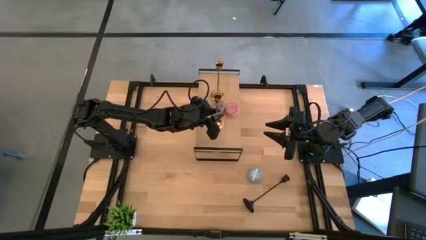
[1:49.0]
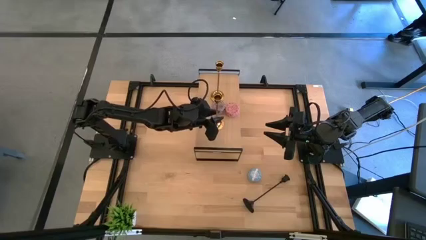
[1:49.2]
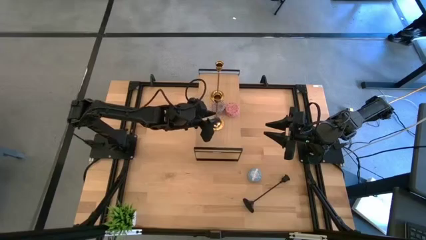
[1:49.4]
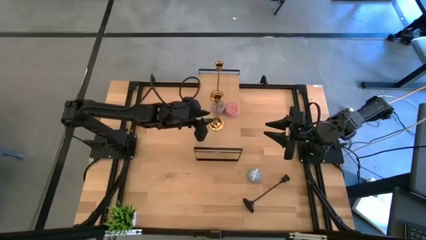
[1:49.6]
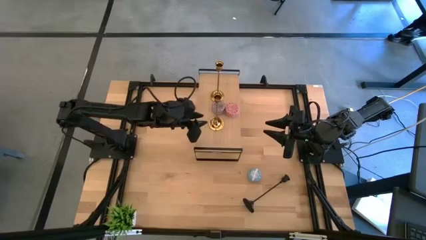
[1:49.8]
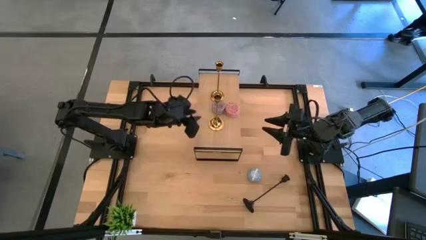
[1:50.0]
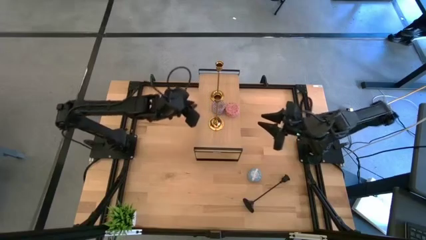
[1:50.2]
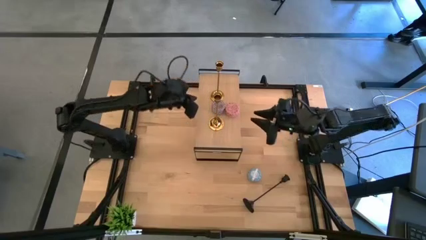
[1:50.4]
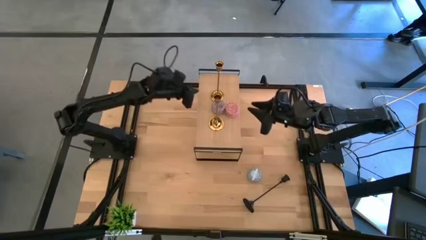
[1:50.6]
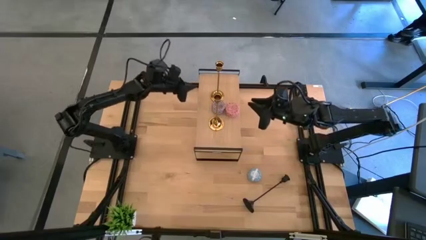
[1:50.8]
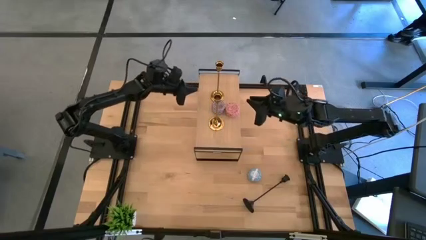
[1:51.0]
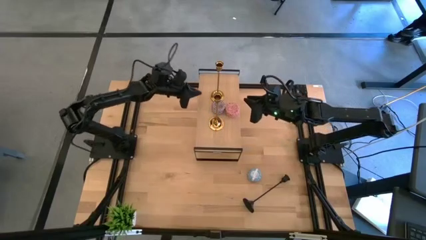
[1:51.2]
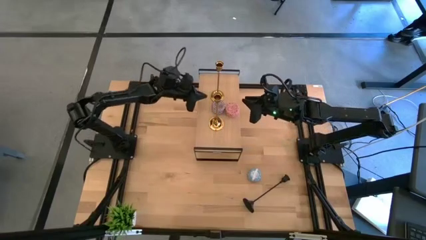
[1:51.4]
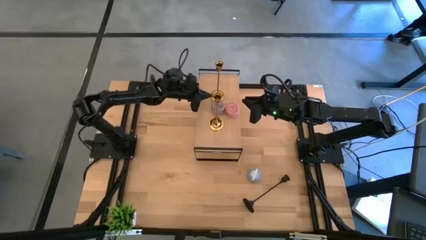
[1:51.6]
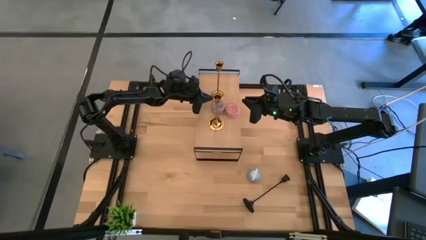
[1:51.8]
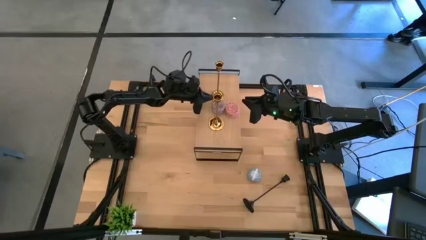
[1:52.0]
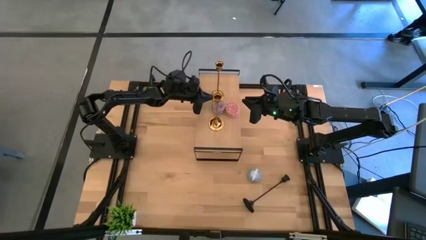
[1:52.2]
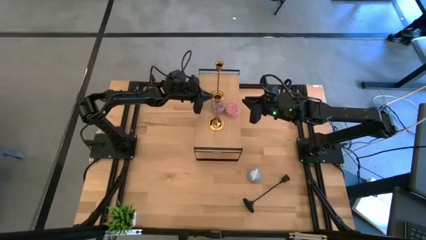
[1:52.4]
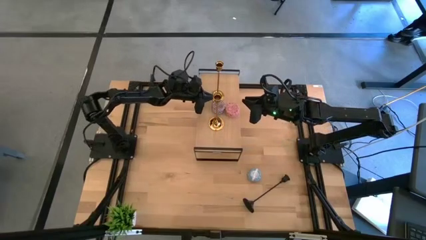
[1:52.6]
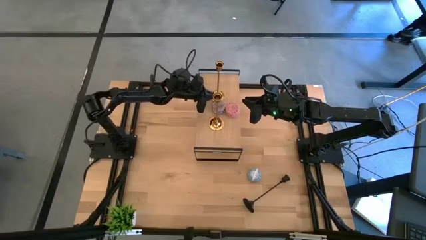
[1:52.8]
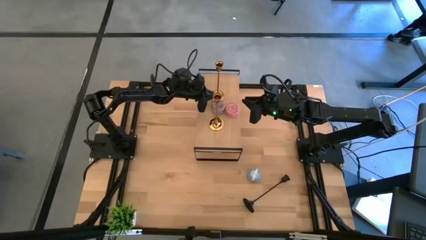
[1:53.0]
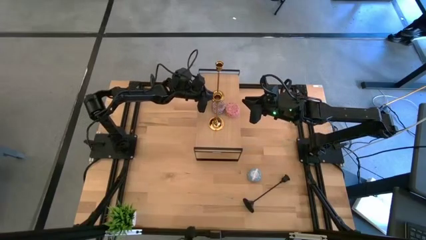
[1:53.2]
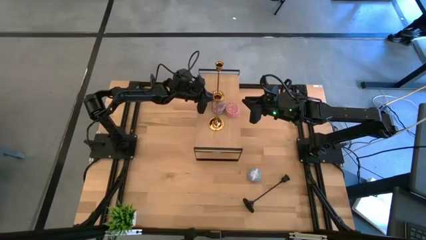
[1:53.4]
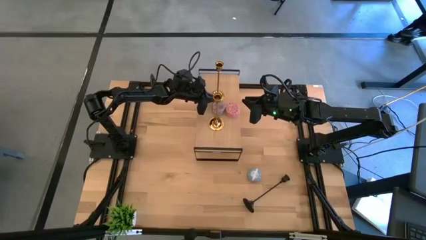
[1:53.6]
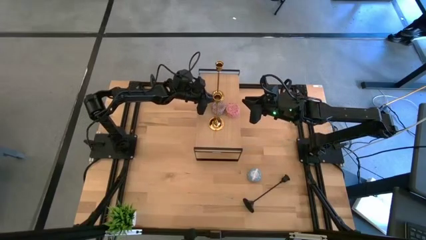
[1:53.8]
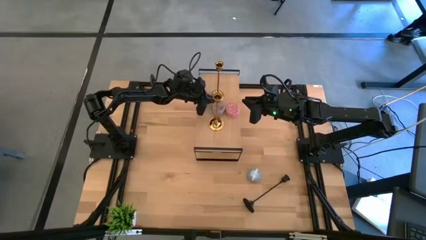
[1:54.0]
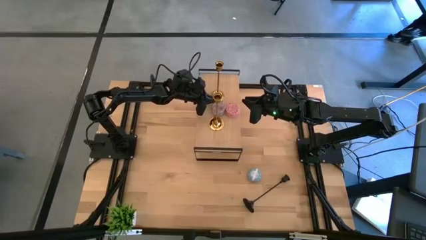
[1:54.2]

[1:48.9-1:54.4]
Task: Pick & Place candle stick holders
Adjust the violet scented candle

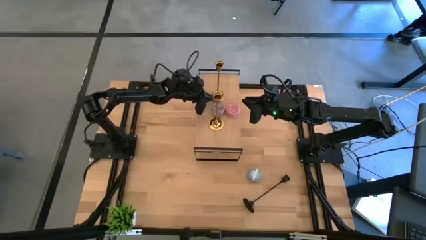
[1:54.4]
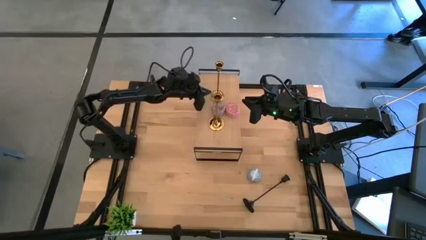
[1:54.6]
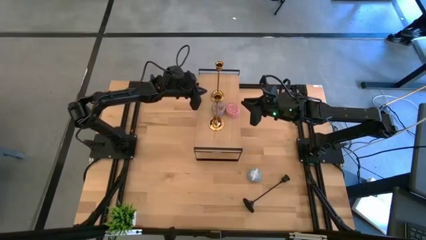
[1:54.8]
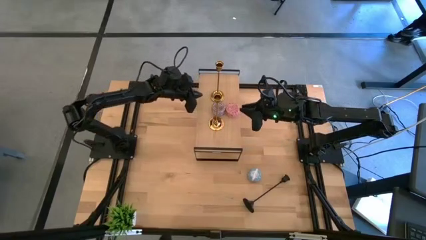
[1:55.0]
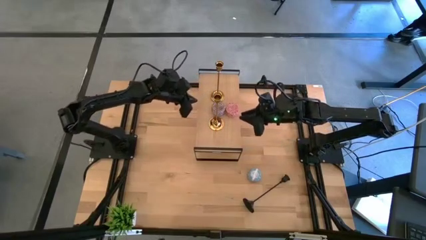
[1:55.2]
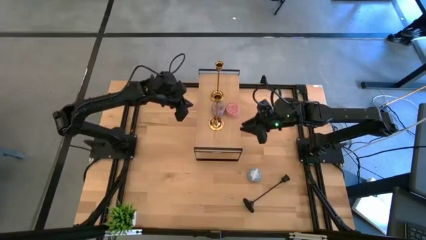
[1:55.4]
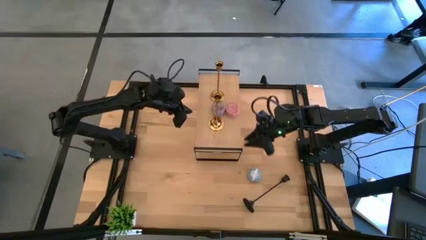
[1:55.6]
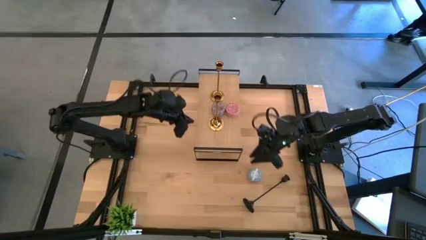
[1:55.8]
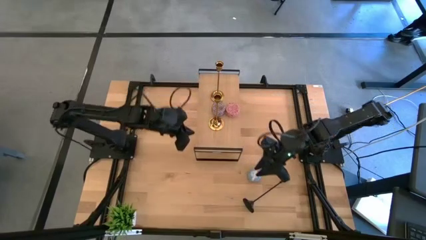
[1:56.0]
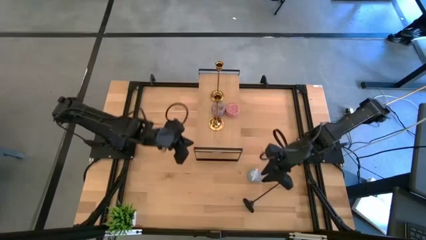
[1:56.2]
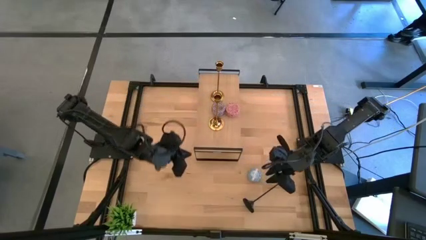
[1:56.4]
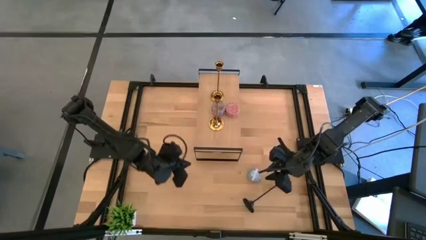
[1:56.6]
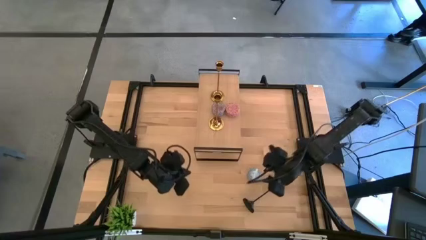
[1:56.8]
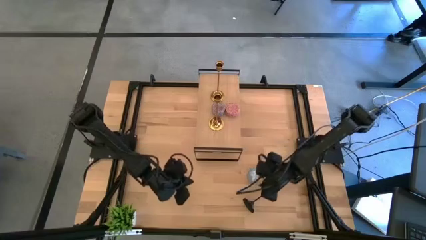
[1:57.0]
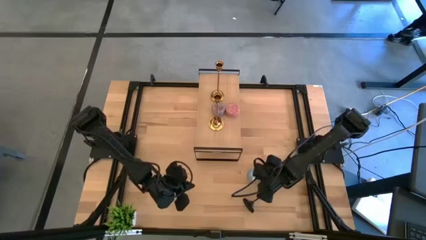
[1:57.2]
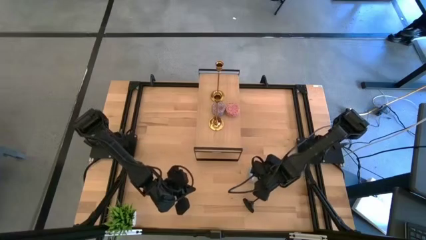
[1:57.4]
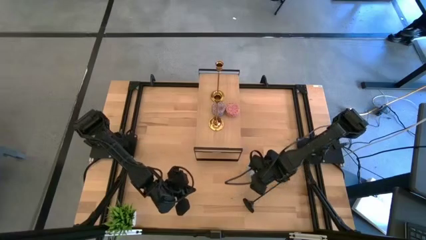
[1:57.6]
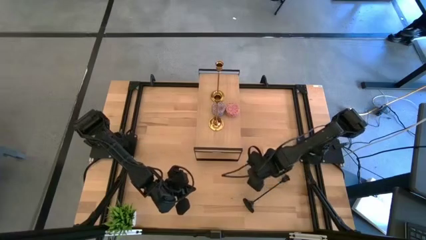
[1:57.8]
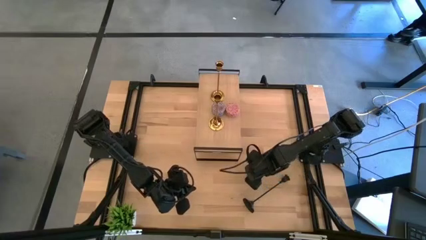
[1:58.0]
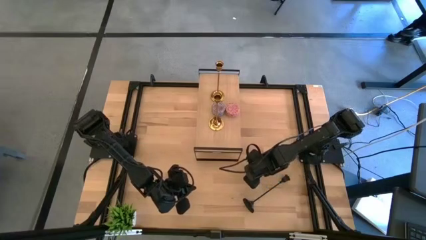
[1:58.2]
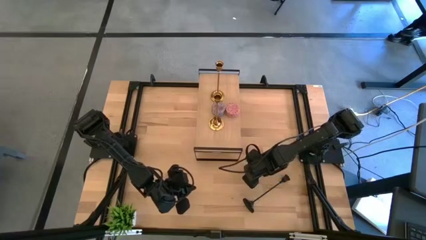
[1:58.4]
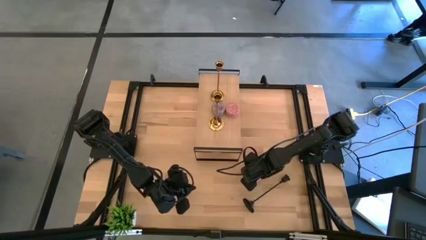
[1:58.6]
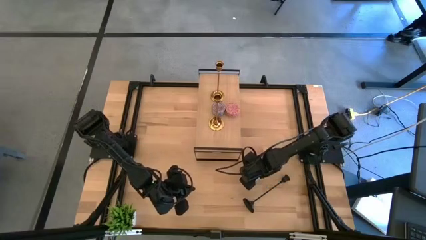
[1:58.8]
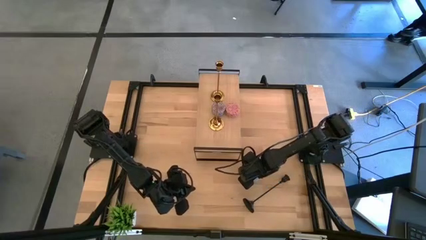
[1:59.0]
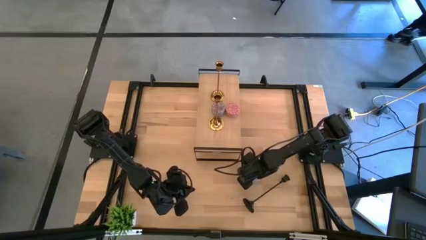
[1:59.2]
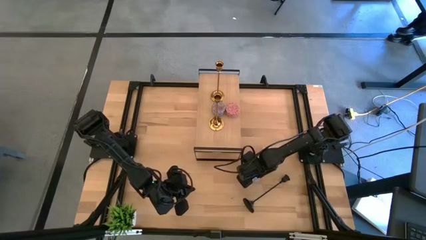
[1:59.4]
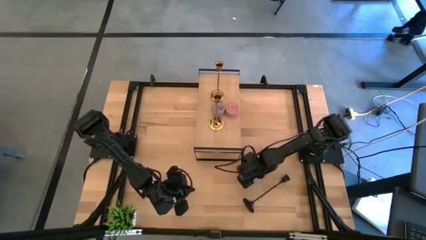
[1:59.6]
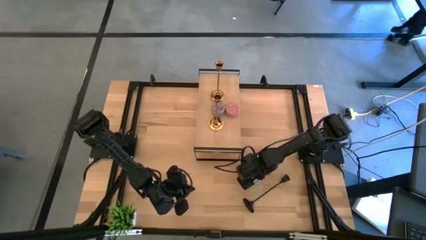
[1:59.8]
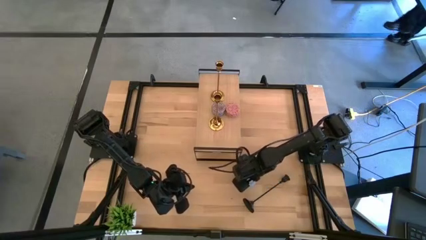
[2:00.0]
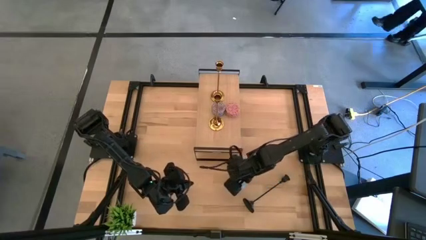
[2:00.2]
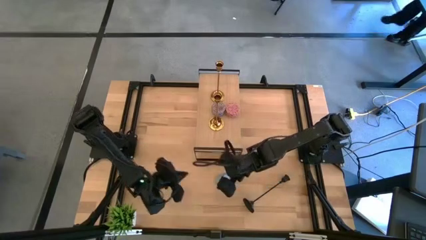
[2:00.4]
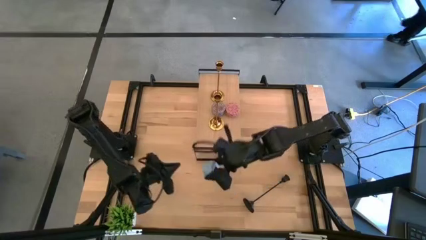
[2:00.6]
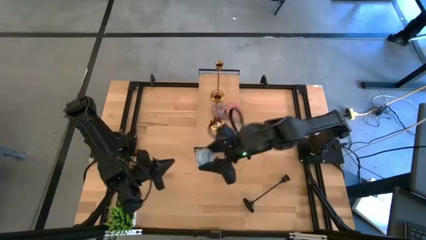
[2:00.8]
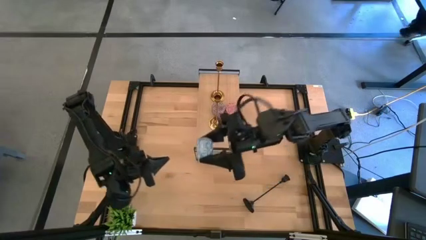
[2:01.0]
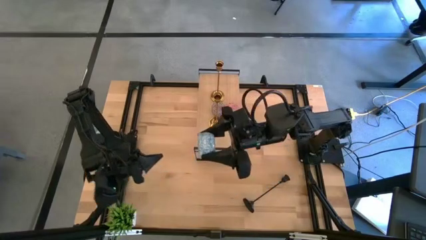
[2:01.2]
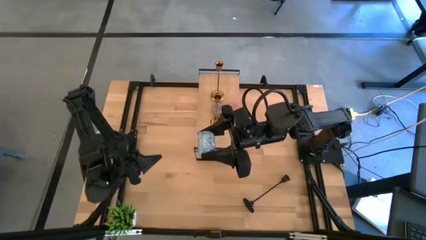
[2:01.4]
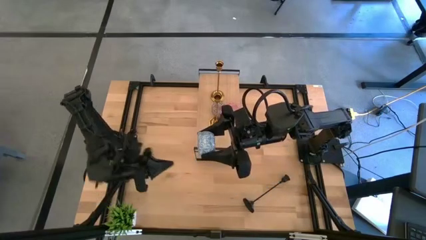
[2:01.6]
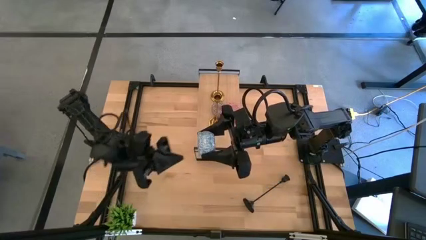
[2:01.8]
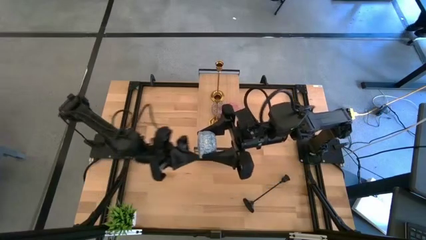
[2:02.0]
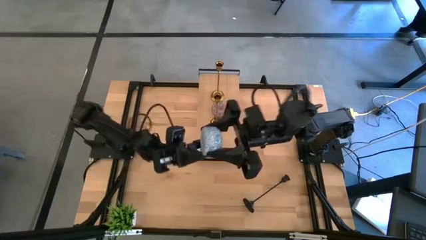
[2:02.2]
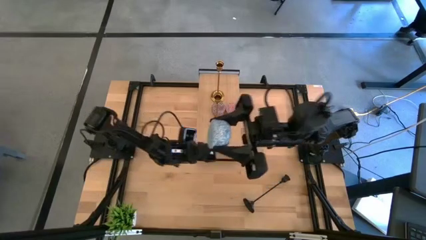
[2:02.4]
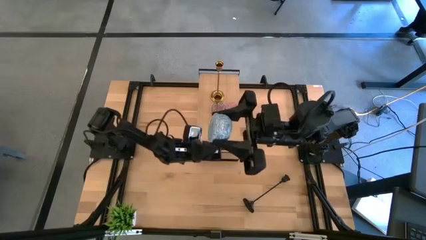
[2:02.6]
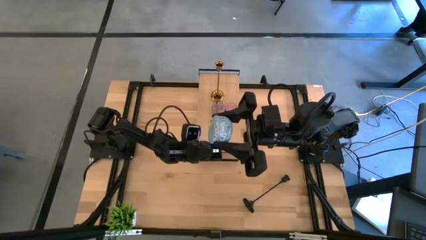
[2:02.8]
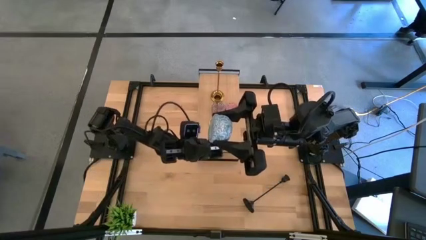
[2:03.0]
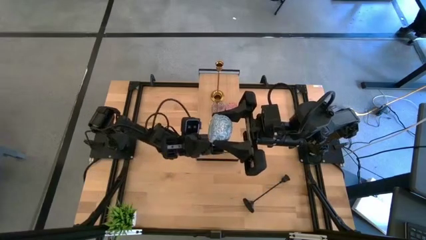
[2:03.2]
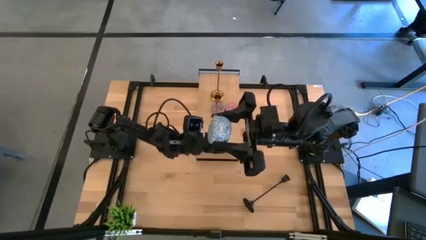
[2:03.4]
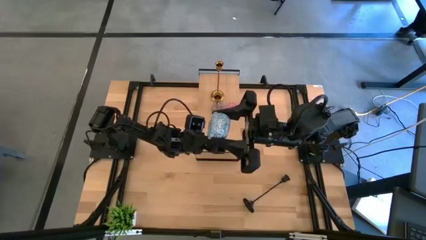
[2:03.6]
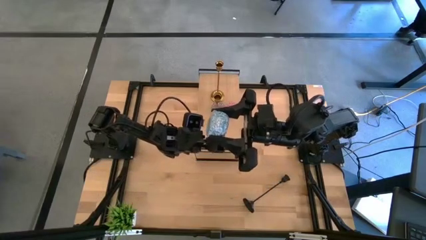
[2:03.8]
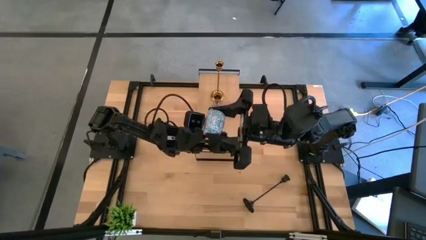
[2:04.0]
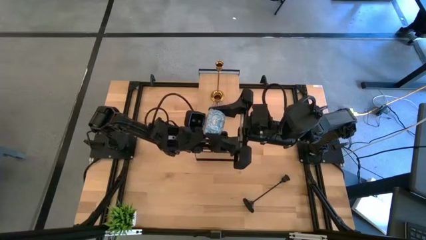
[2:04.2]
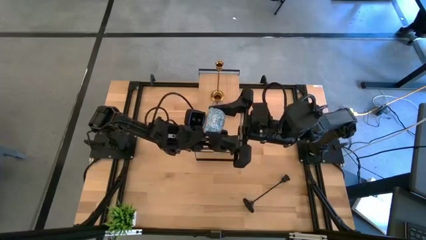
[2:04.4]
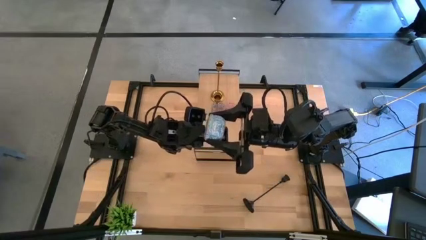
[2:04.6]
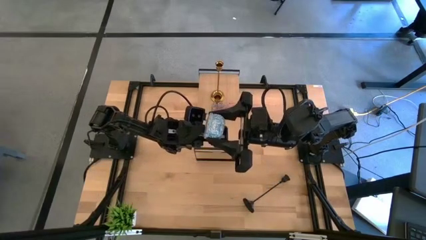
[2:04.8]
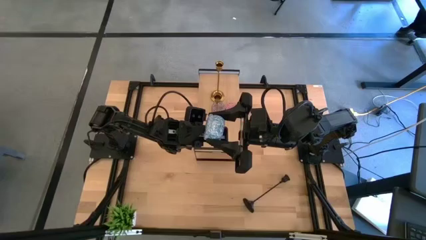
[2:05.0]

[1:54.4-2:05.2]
Put the blue scented candle on the shelf
